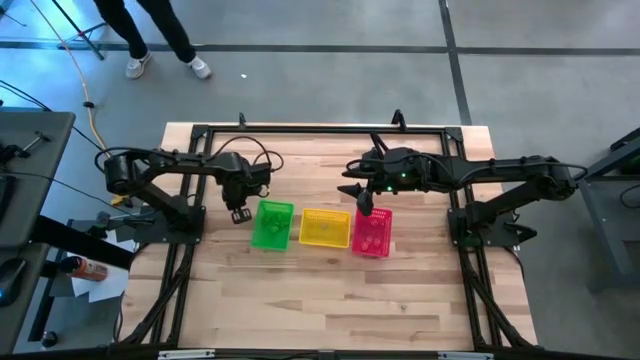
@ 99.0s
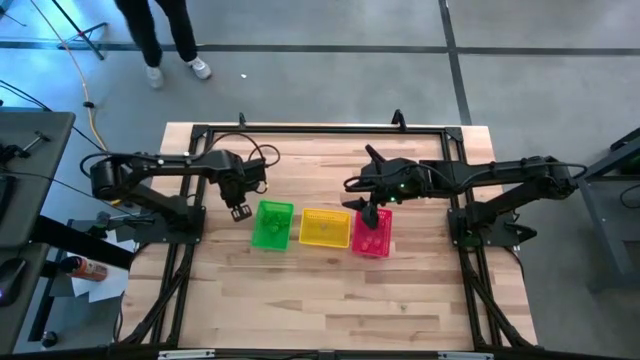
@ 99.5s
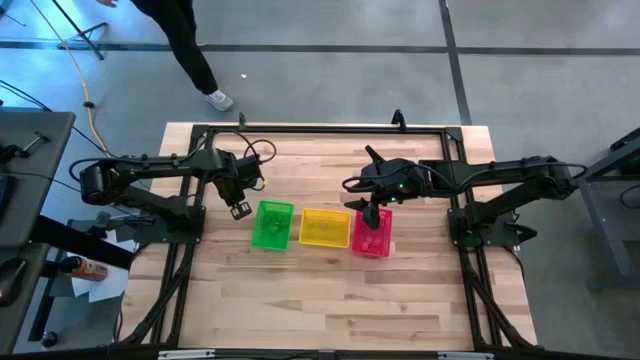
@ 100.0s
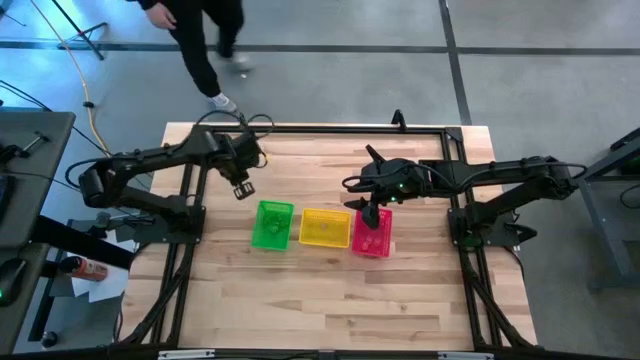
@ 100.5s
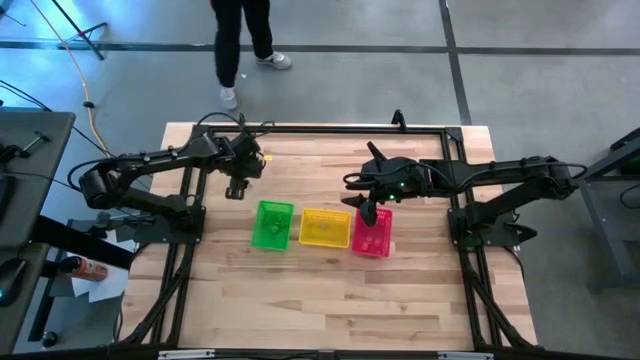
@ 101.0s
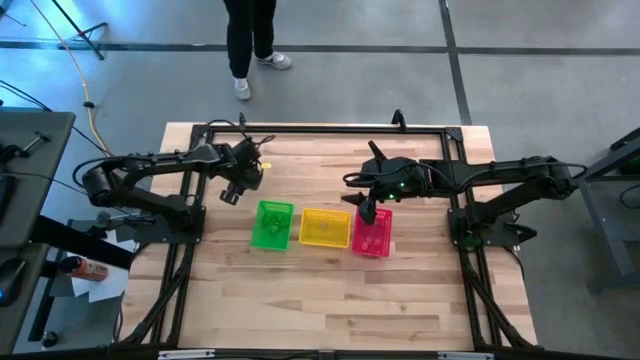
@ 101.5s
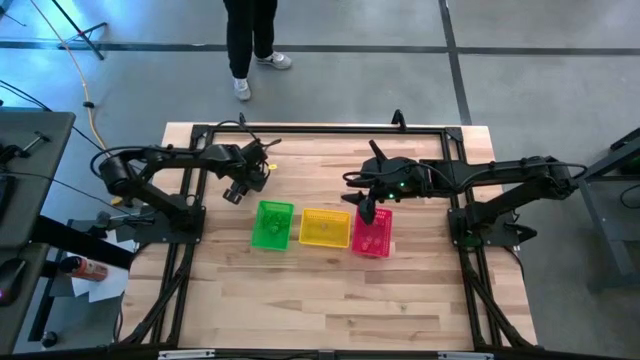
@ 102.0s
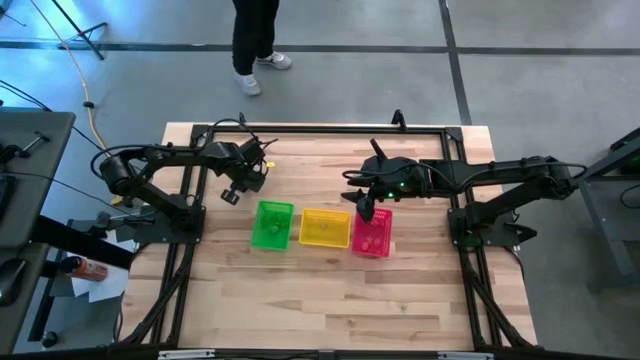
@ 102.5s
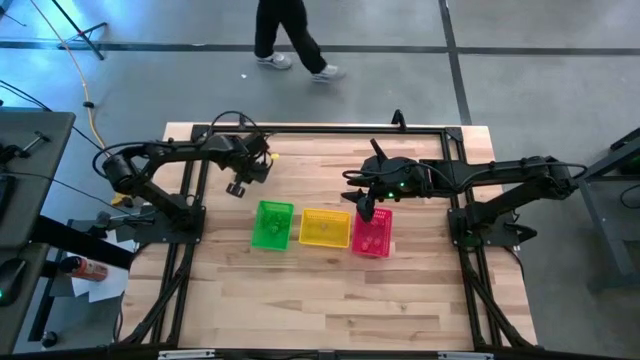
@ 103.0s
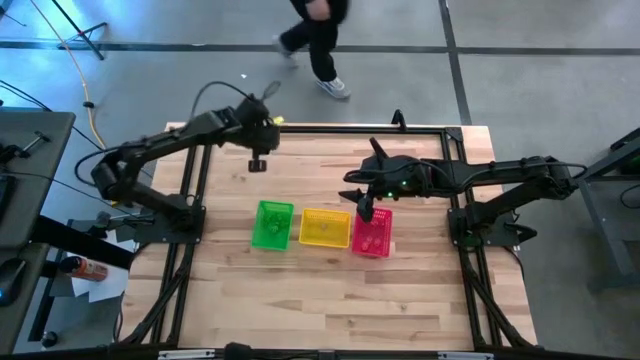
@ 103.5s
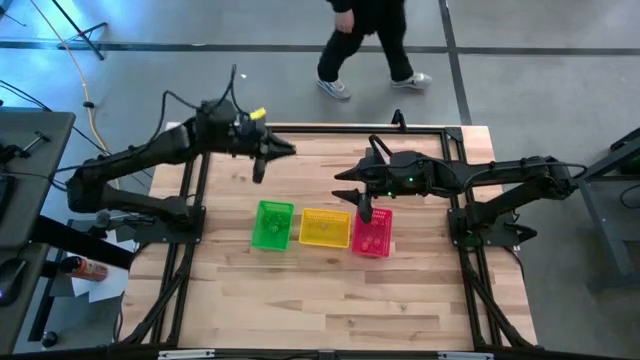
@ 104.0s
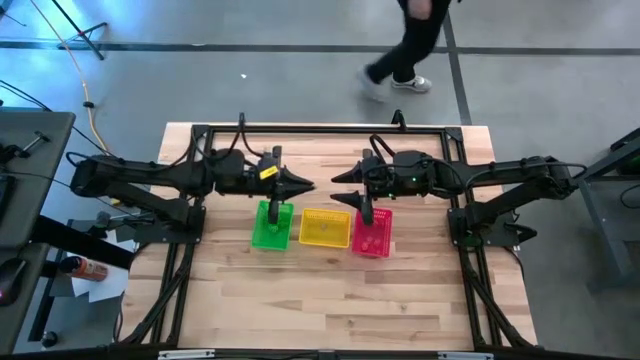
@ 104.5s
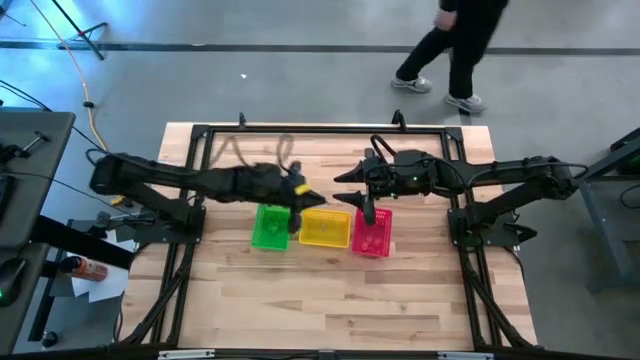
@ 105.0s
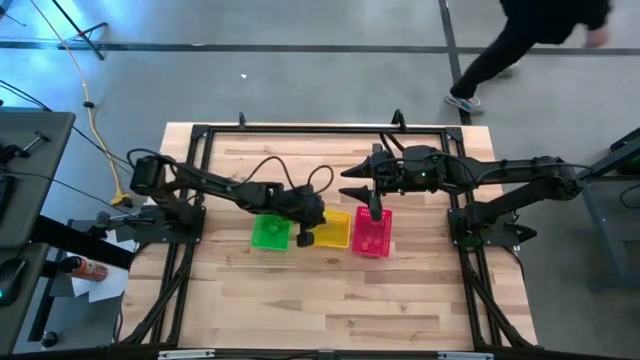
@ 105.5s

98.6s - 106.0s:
Task: Sort Halloween decoration
Put the white skull toy into the yellow basket

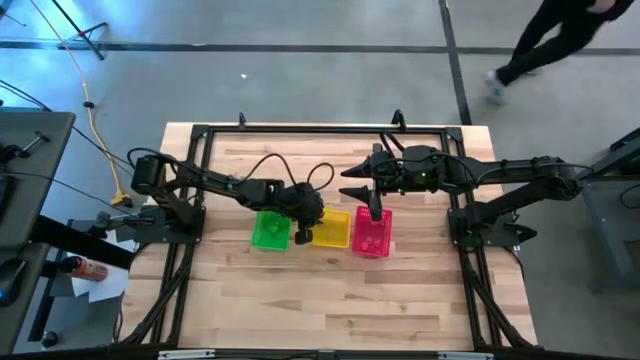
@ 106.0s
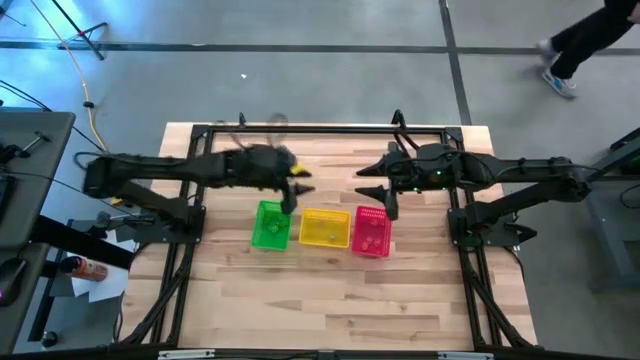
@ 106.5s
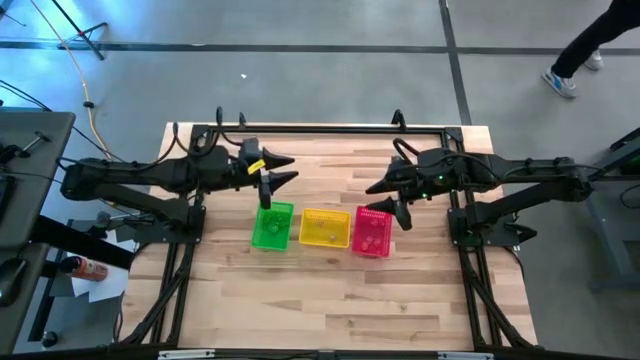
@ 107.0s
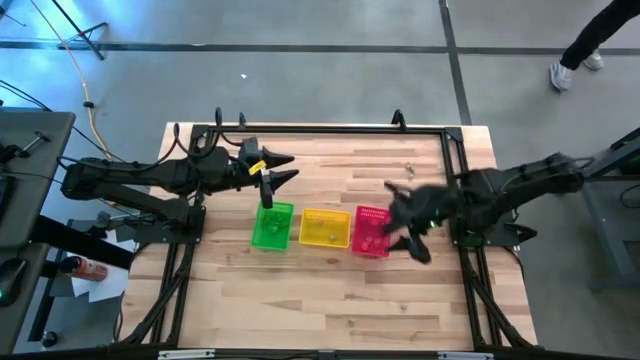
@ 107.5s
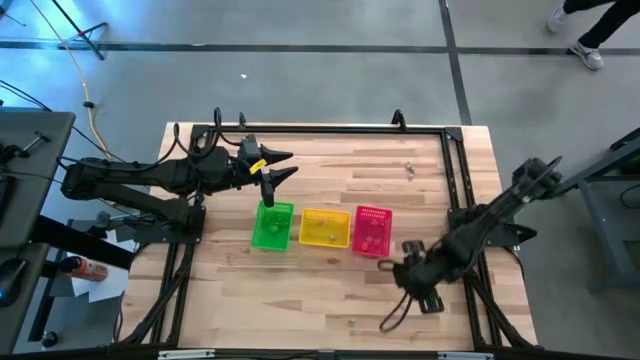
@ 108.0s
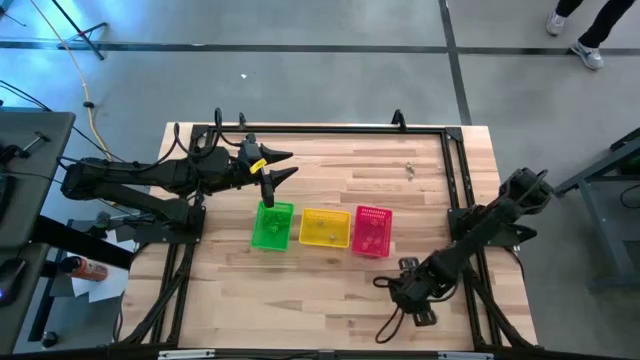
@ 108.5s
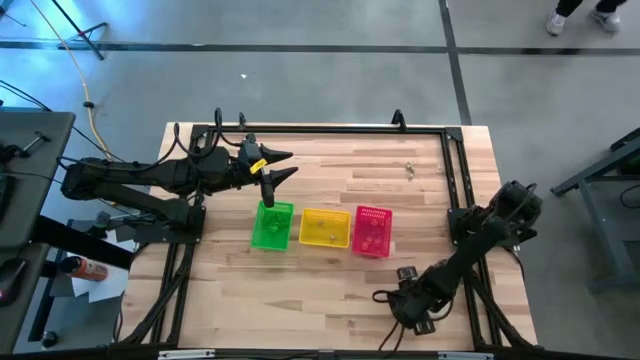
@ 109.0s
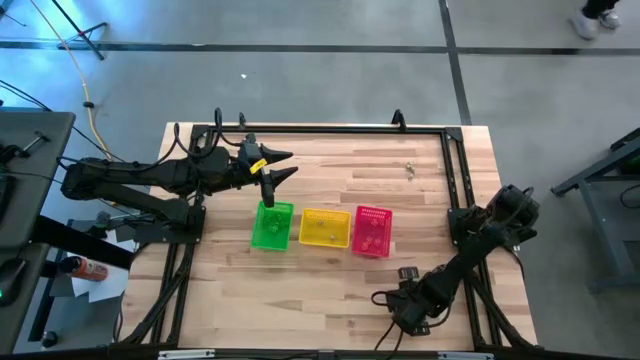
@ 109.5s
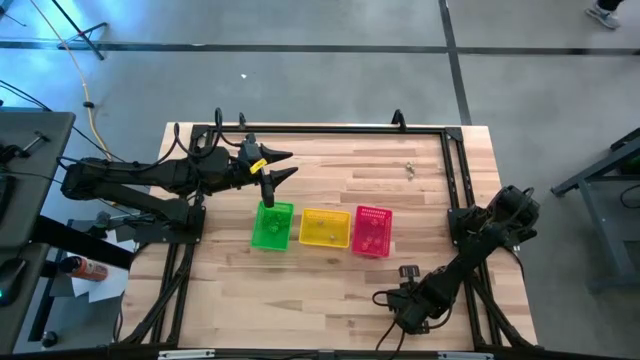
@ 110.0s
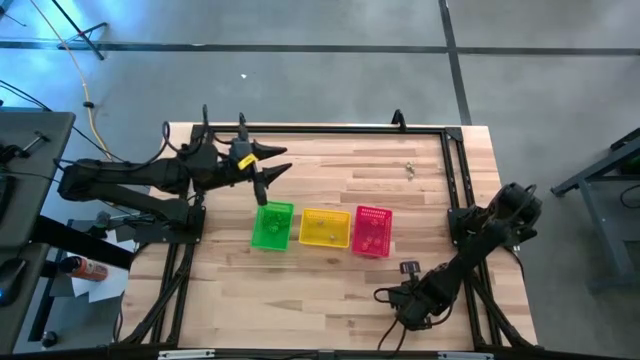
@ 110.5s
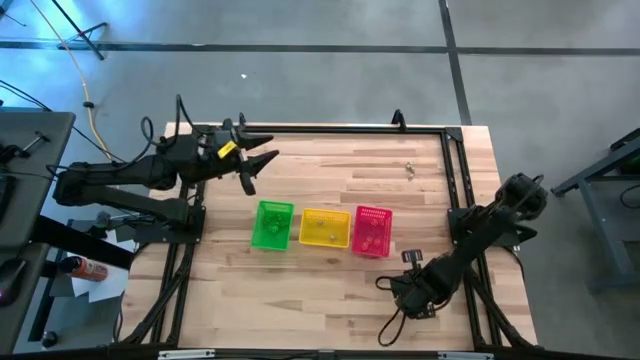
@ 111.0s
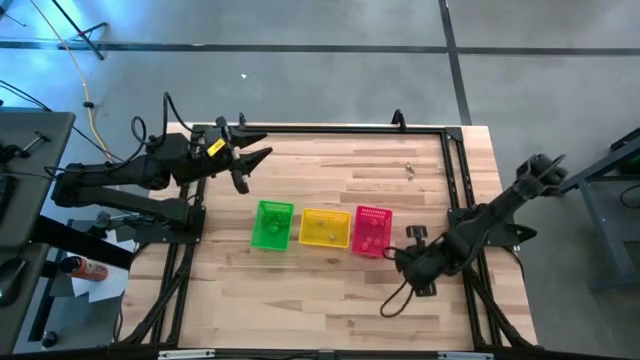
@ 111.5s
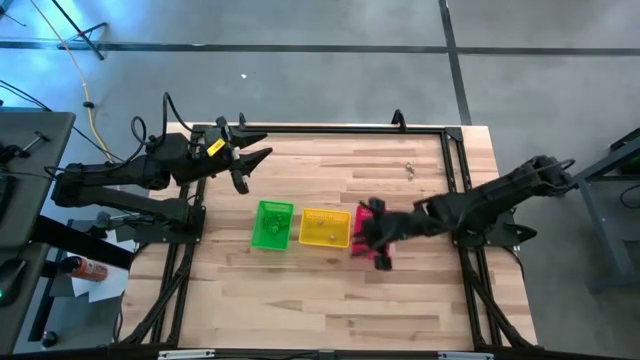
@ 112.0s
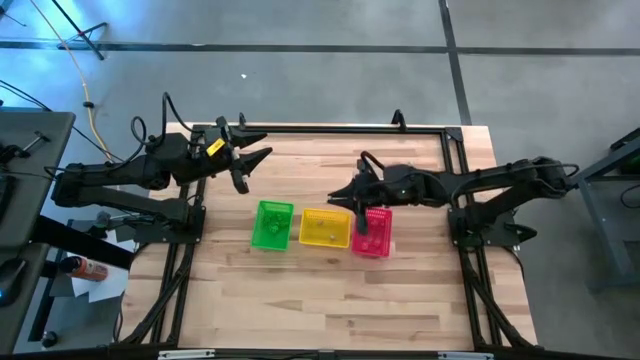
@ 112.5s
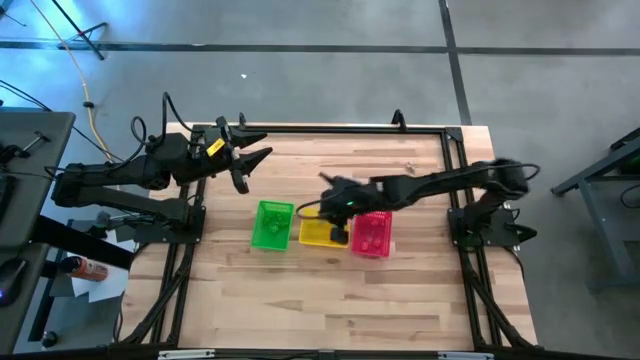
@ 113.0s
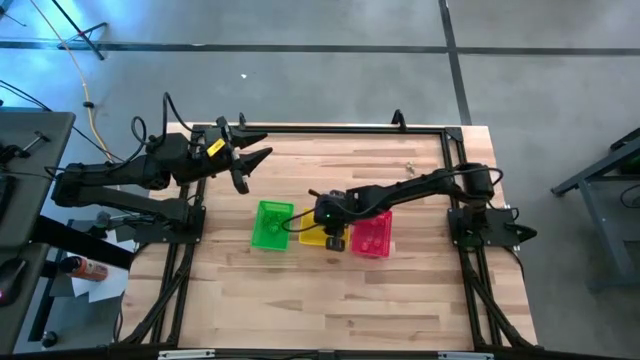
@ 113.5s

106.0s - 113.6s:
Put the white skull toy into the yellow basket

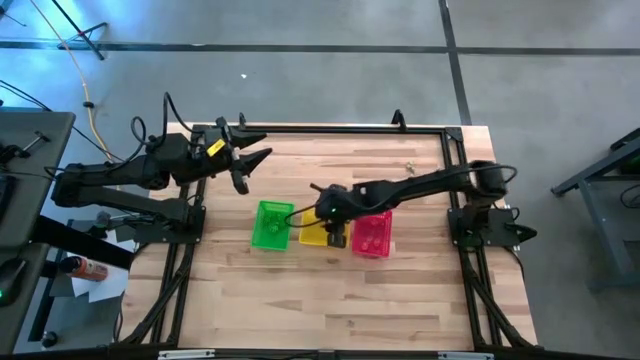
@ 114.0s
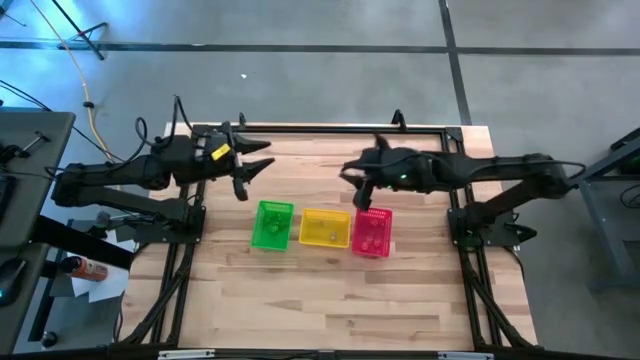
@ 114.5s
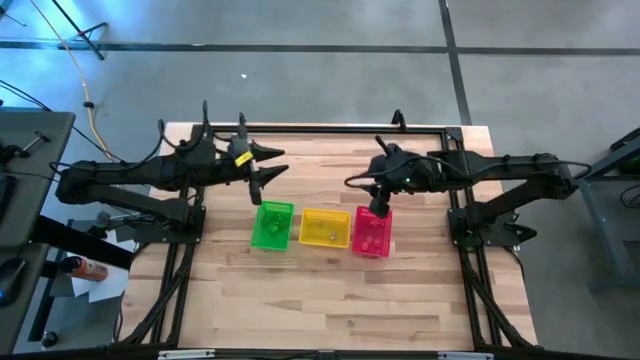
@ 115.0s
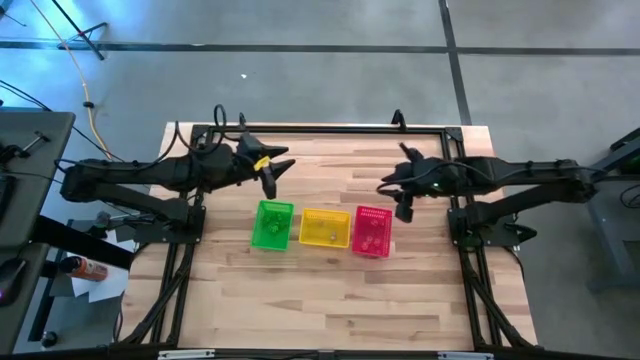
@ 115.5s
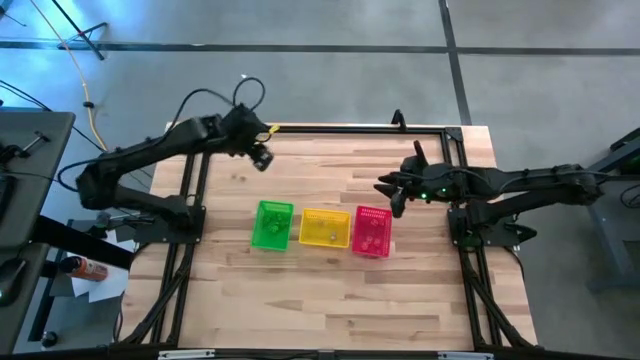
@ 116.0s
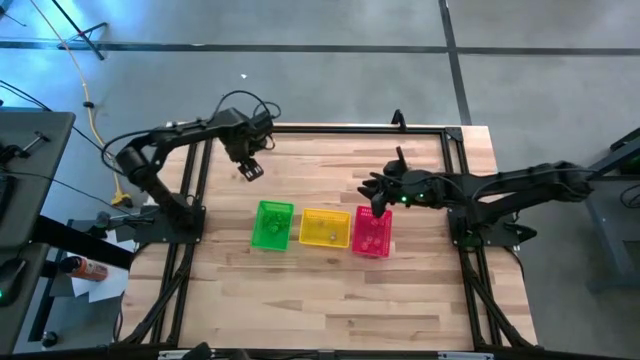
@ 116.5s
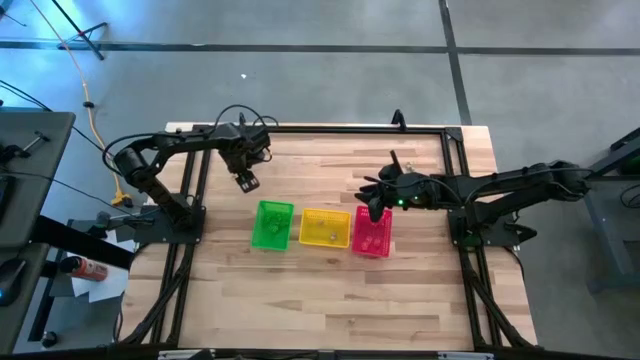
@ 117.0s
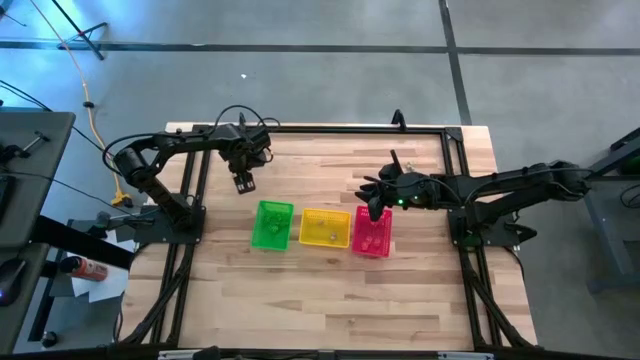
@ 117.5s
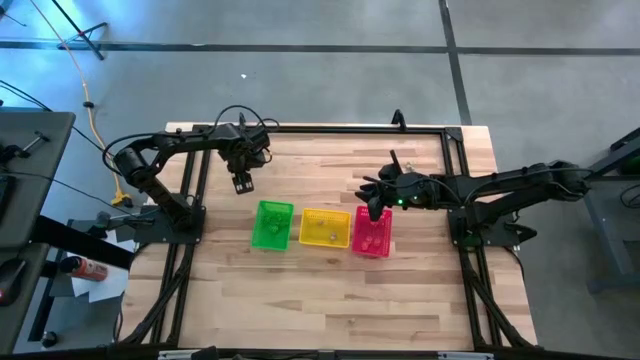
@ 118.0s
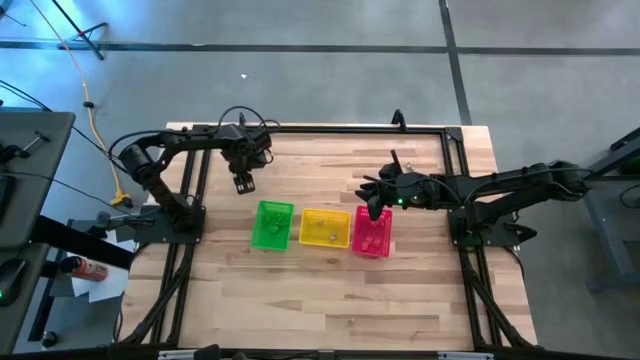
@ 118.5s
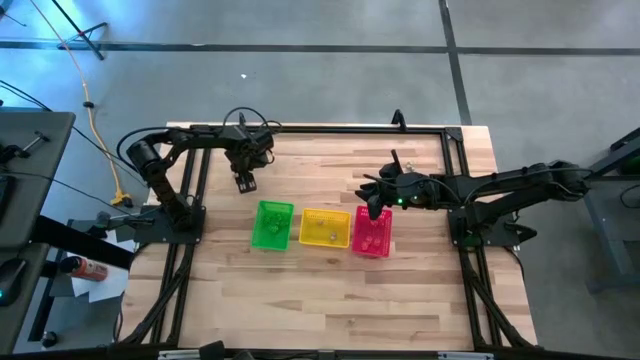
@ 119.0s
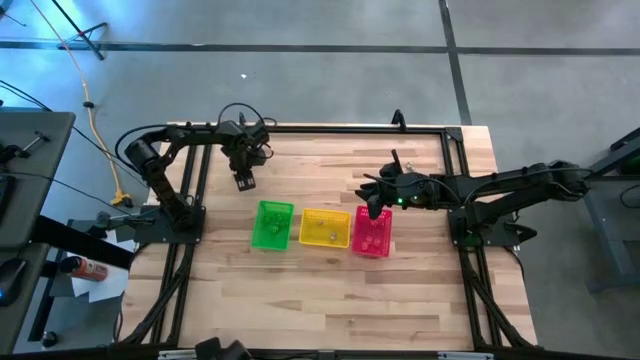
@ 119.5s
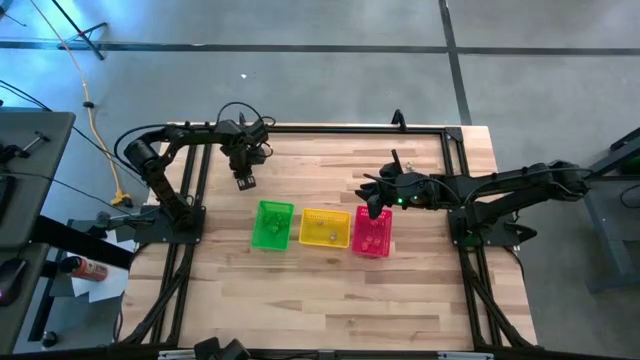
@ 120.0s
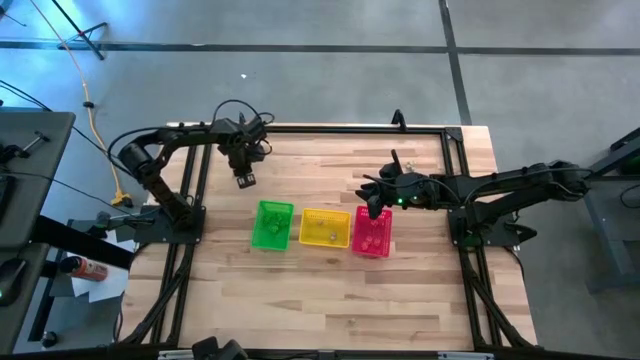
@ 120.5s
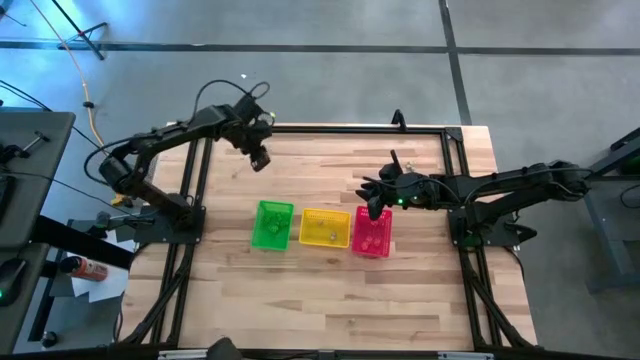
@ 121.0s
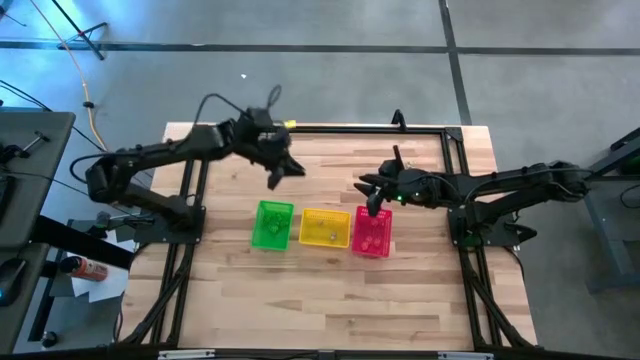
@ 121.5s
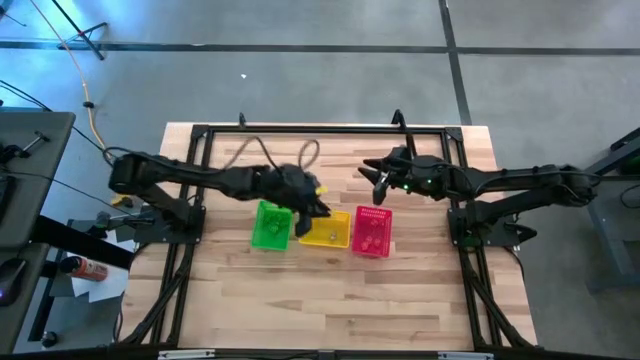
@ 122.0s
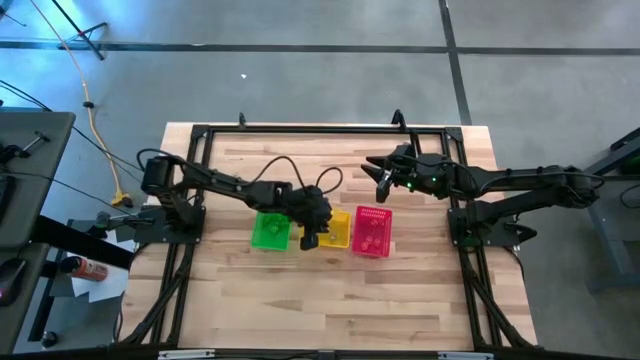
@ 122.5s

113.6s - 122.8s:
Put the white skull toy into the yellow basket
